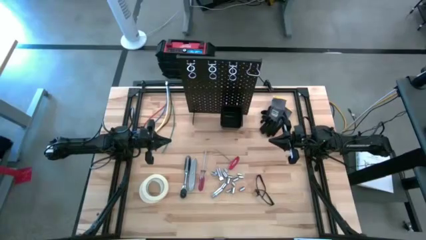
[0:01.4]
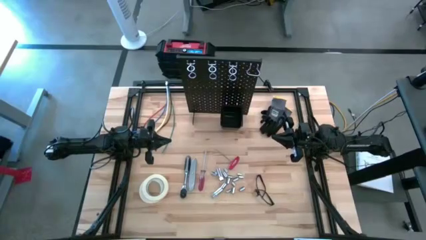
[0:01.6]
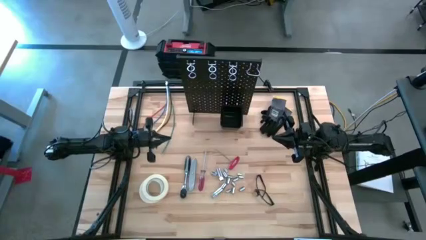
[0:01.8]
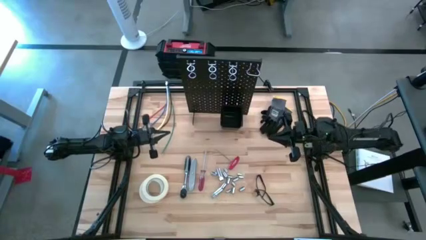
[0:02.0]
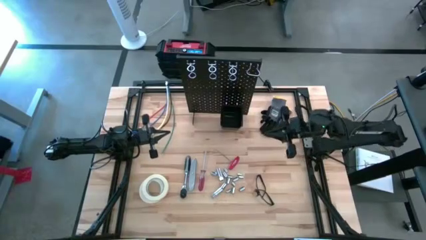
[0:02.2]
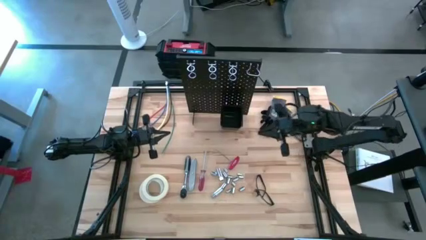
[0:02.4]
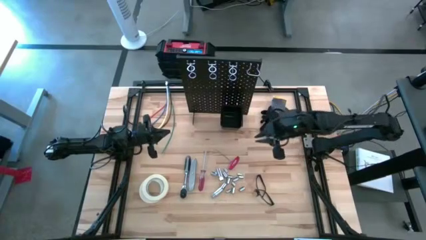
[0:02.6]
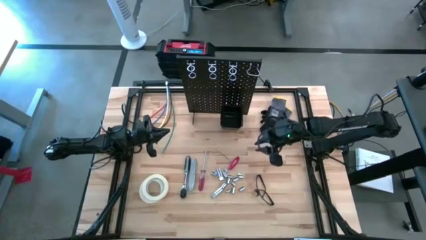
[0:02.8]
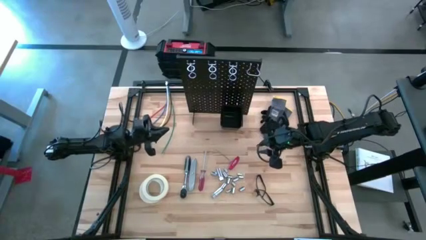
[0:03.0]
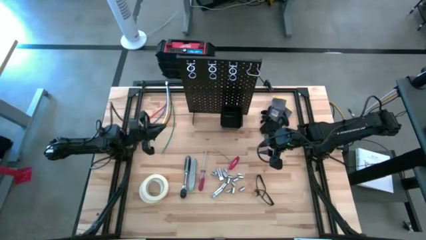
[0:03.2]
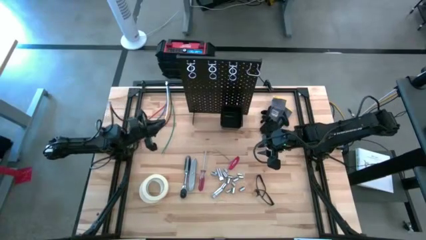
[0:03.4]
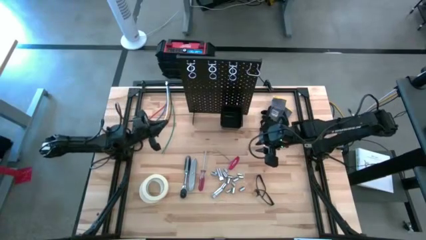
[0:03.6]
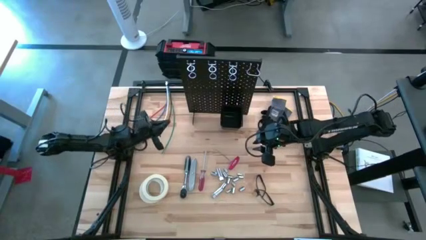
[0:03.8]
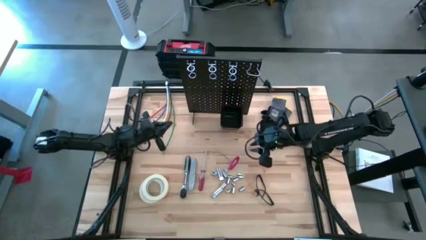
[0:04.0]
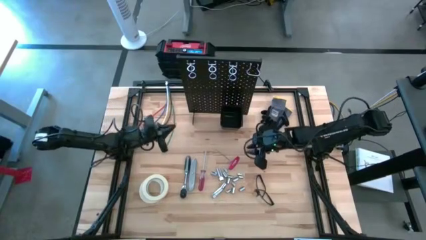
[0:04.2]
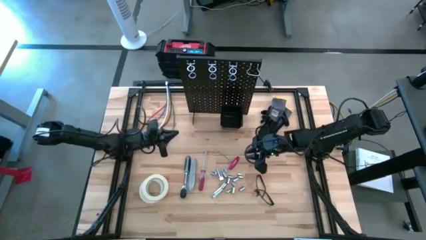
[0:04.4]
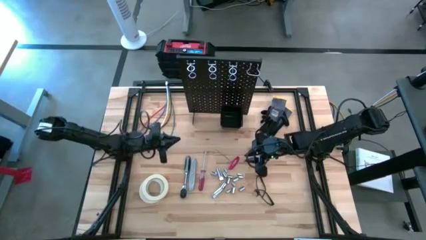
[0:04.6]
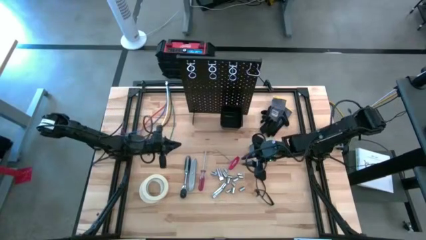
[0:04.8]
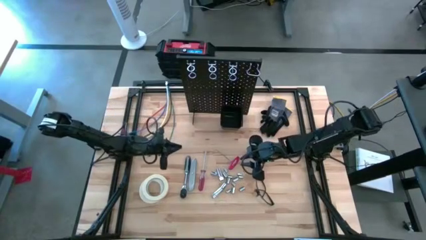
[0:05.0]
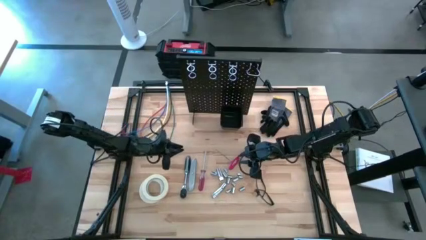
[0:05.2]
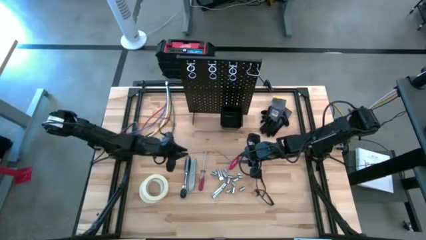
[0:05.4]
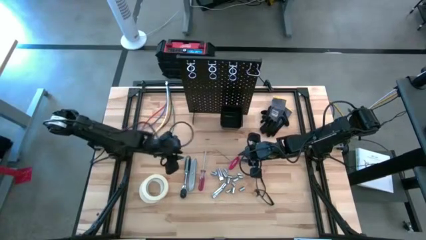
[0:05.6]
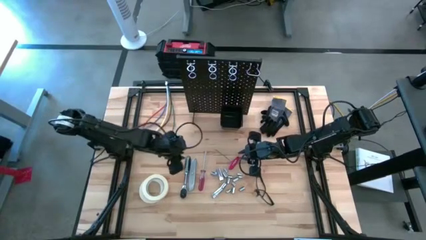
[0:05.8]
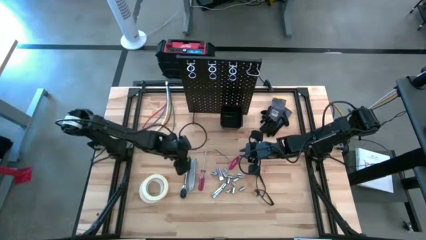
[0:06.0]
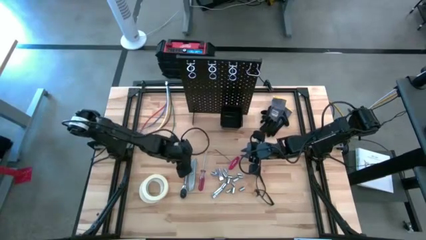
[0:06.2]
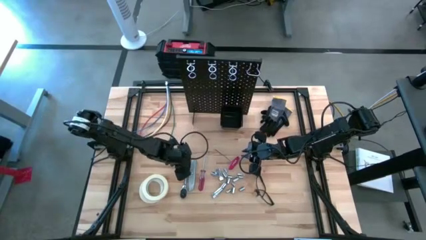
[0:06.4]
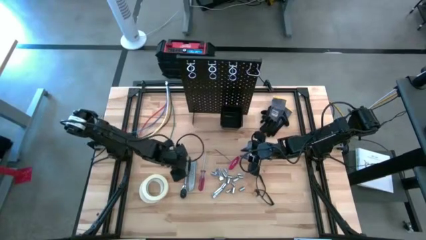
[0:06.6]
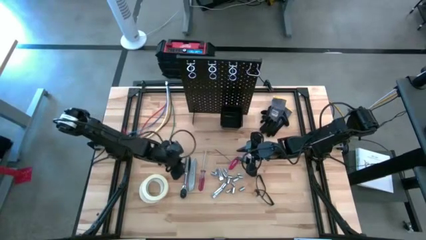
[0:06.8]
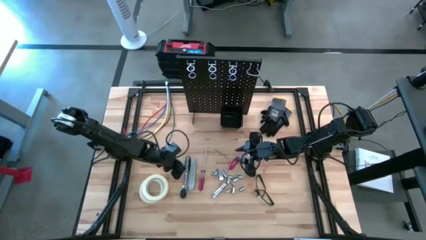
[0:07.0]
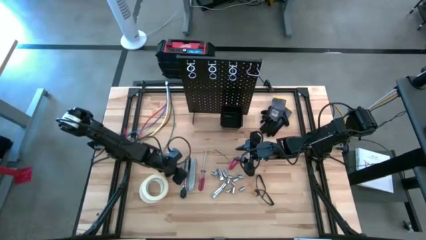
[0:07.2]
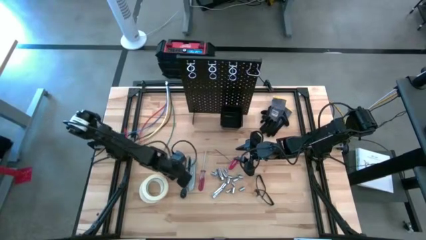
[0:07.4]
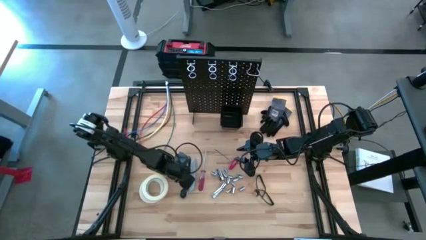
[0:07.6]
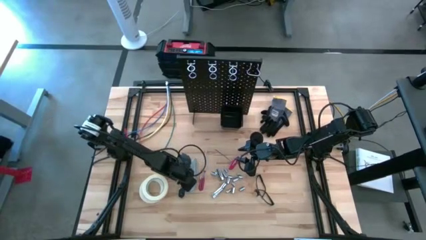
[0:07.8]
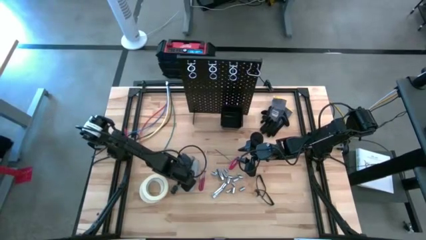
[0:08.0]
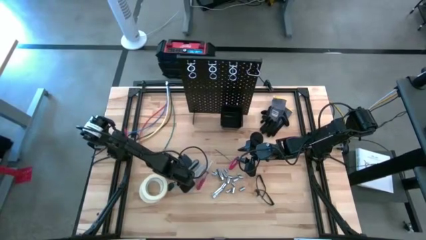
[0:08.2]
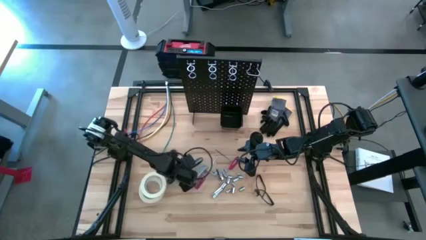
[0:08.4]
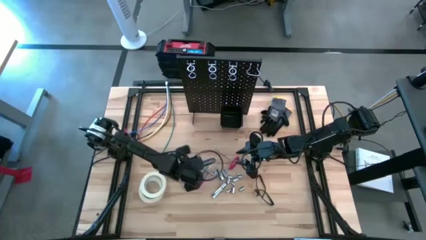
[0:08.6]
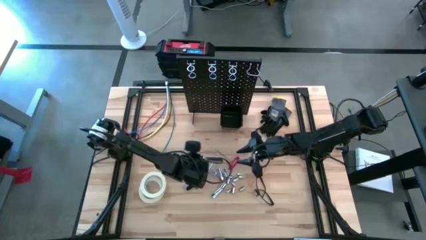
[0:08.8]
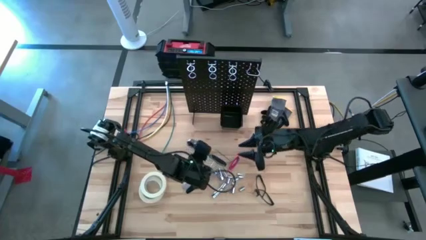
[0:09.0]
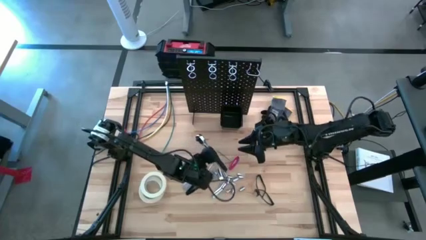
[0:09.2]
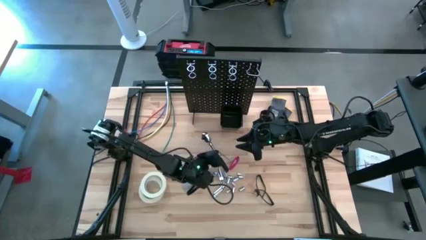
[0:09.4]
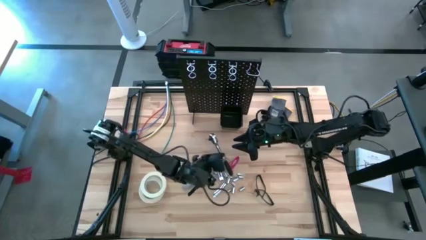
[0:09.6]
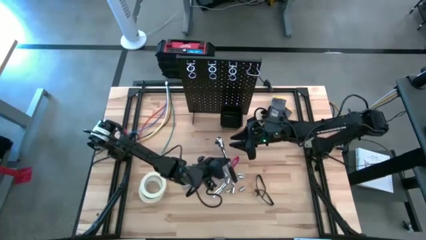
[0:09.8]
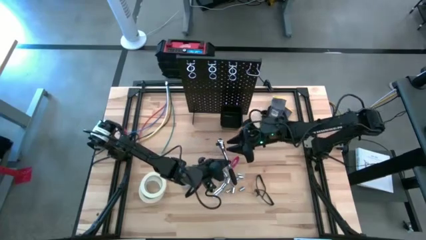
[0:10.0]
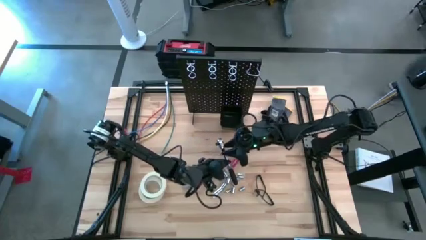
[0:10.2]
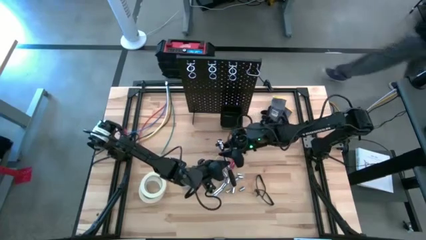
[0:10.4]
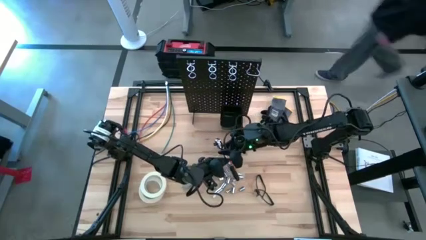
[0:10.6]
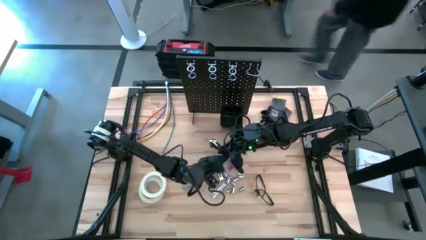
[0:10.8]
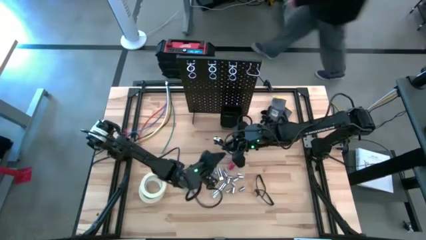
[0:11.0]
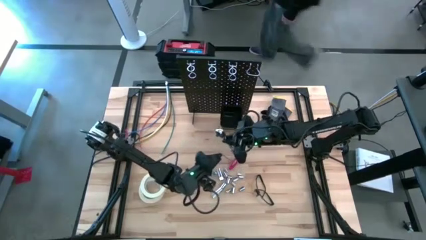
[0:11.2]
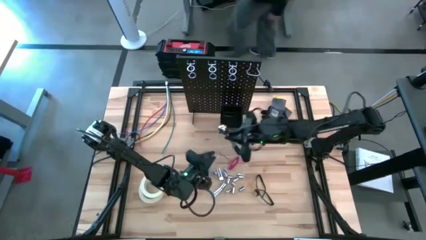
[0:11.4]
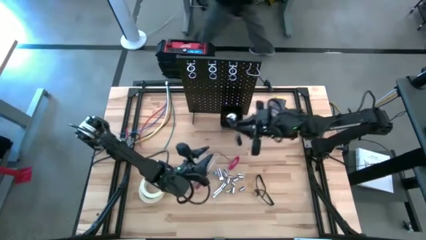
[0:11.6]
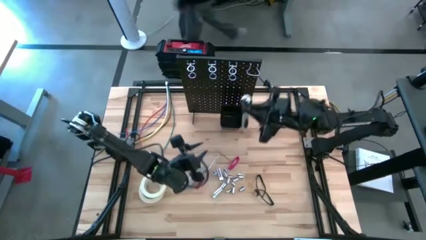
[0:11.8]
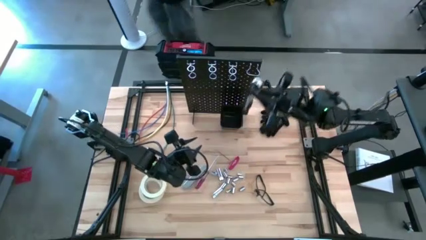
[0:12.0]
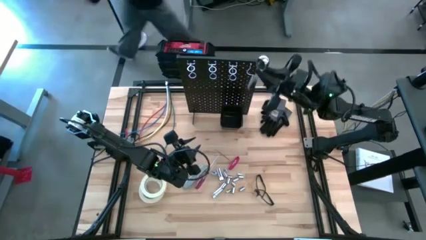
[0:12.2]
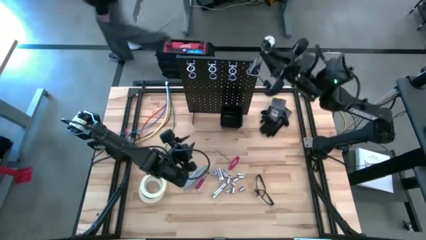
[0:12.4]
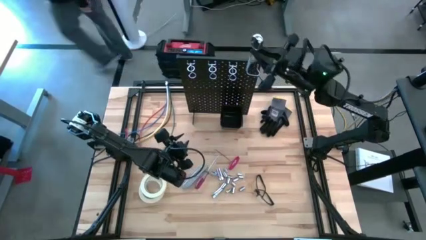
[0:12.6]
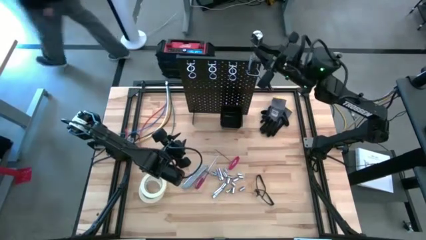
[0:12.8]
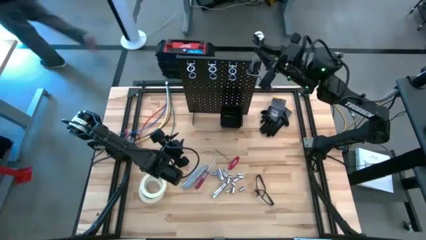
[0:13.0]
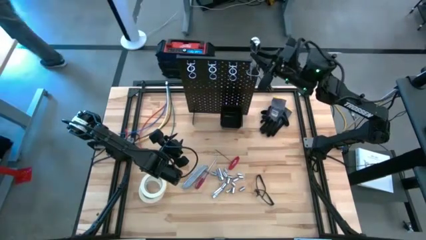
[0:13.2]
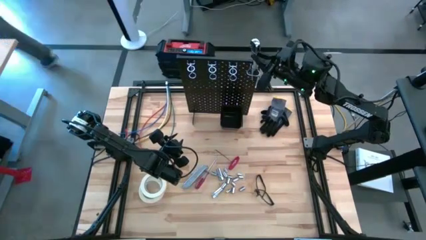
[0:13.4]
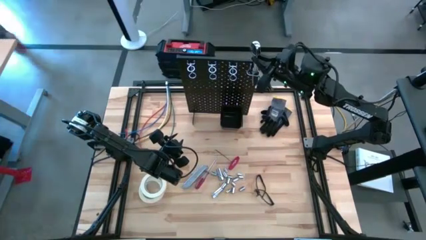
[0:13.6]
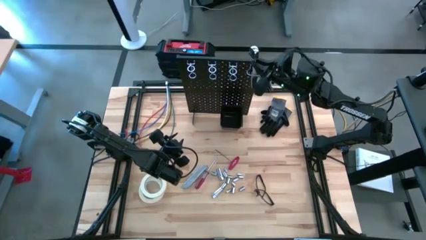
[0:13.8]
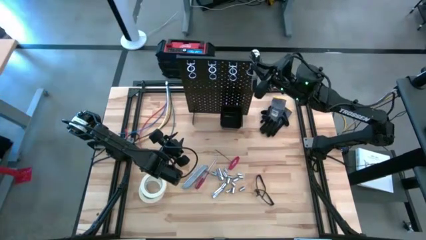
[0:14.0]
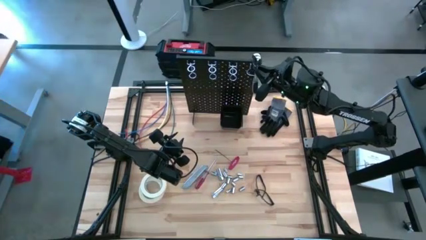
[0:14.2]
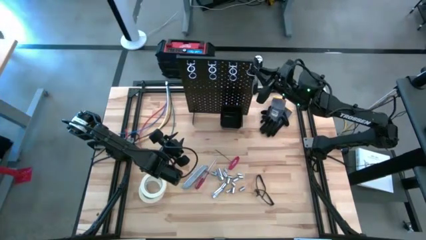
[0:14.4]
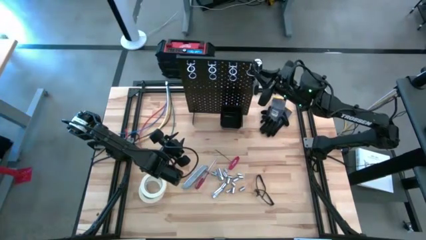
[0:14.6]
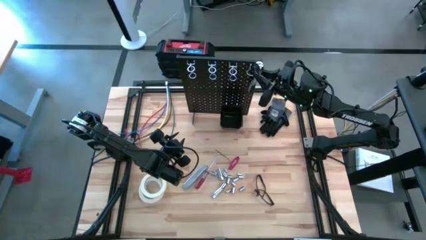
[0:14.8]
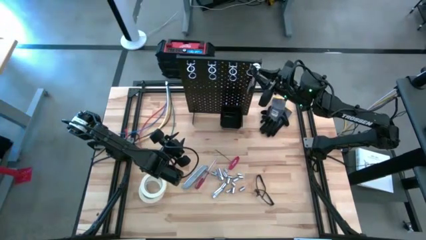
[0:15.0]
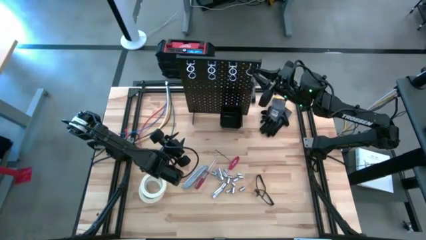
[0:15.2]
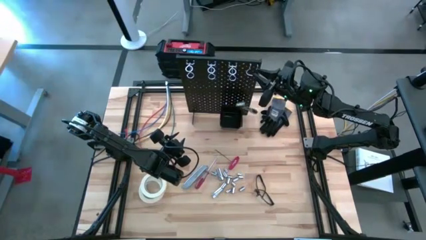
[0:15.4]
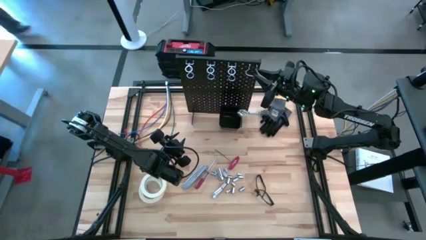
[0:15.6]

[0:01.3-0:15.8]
Task: Hang tools onto peg board
Hang the ratchet wrench on the peg board
